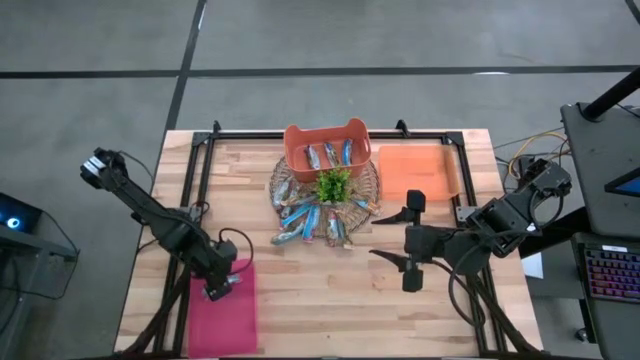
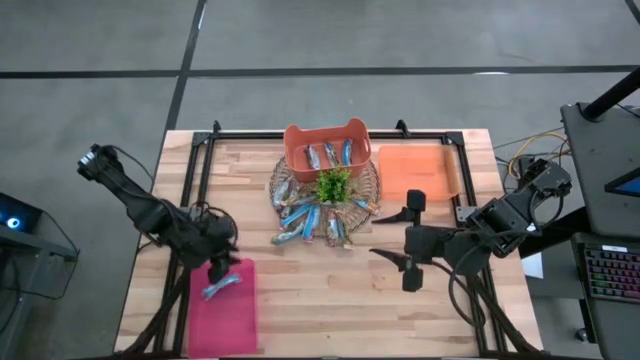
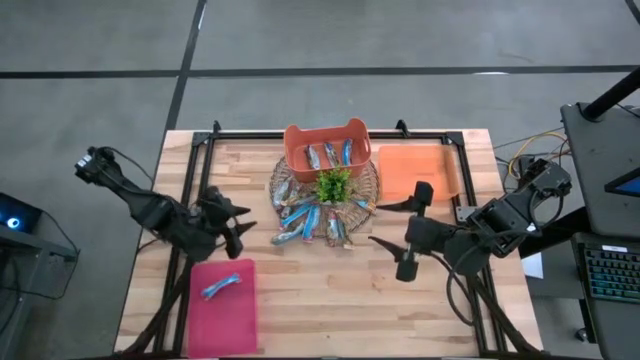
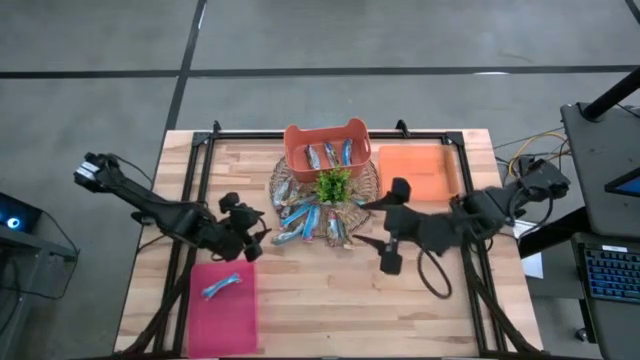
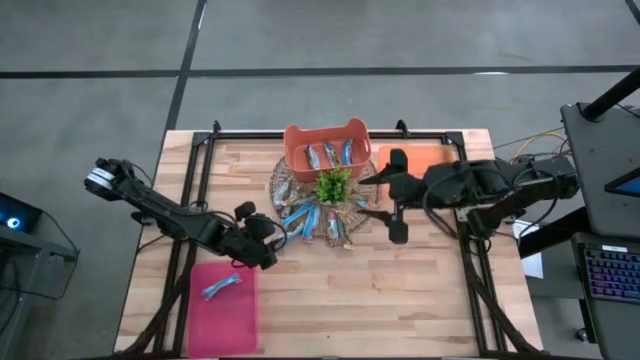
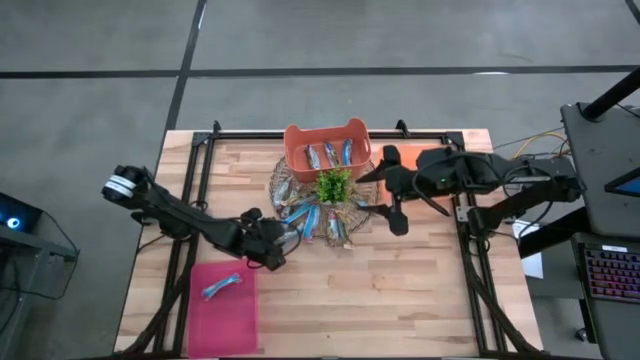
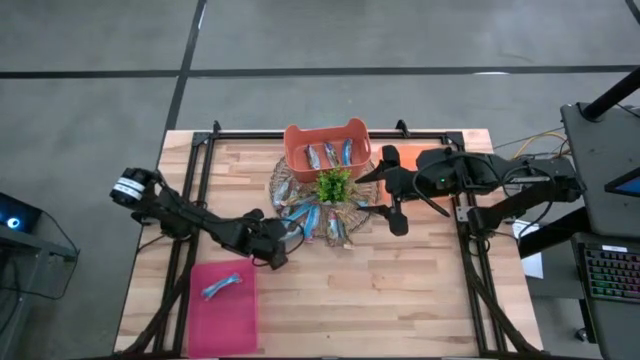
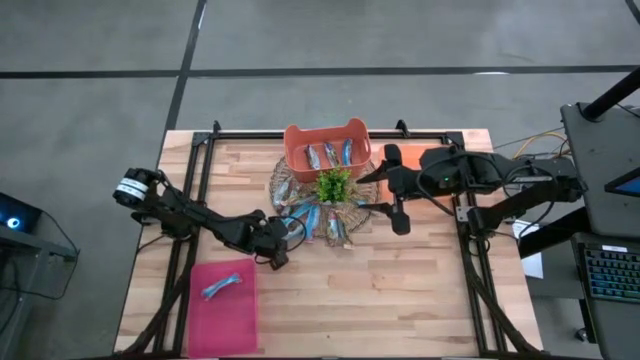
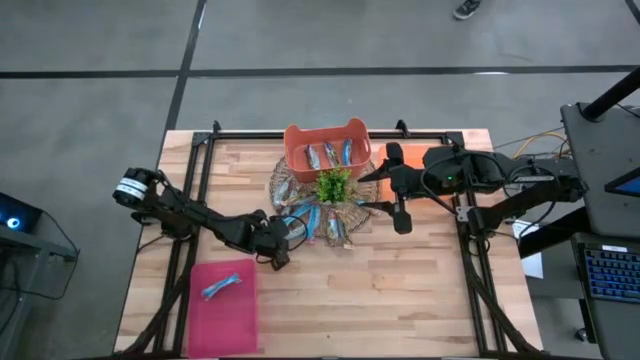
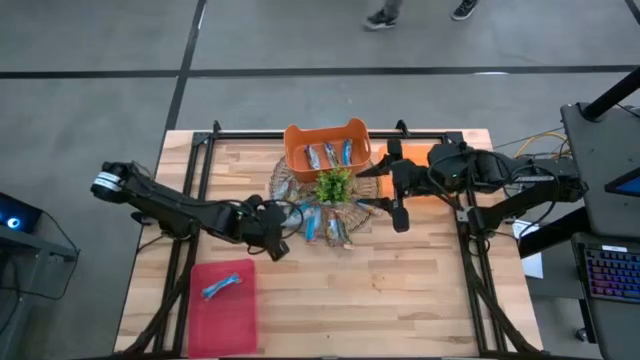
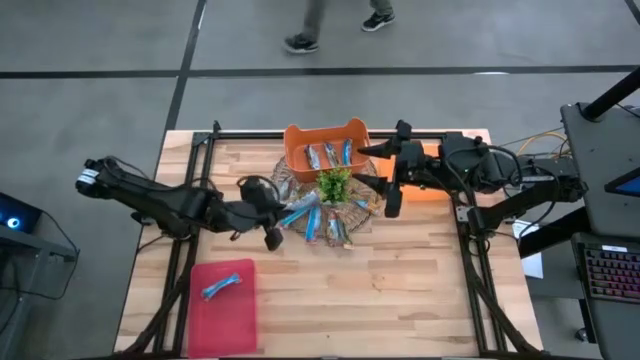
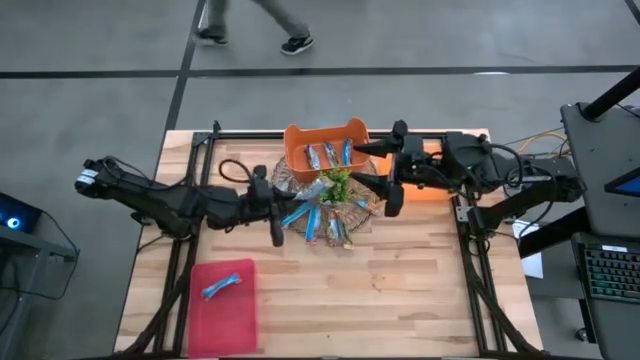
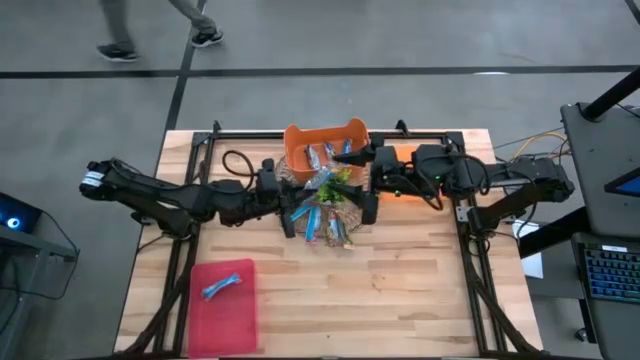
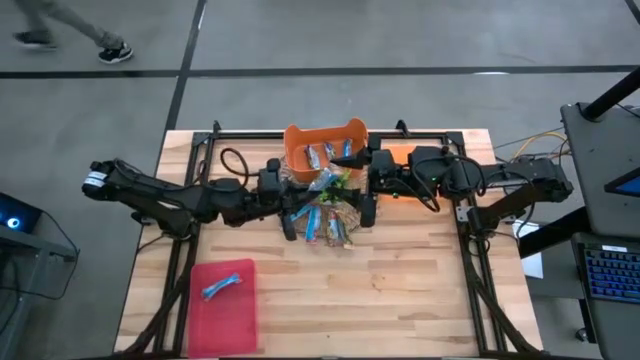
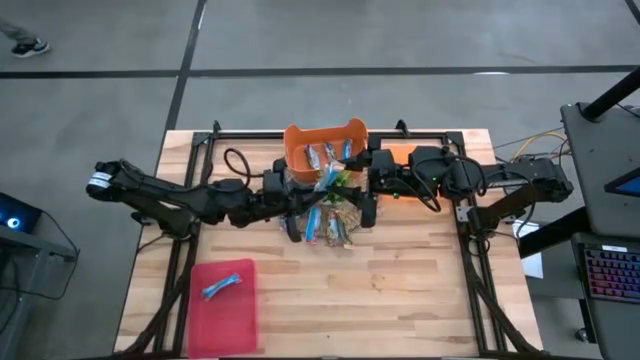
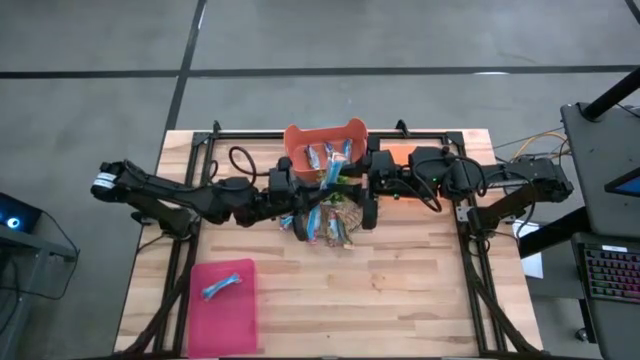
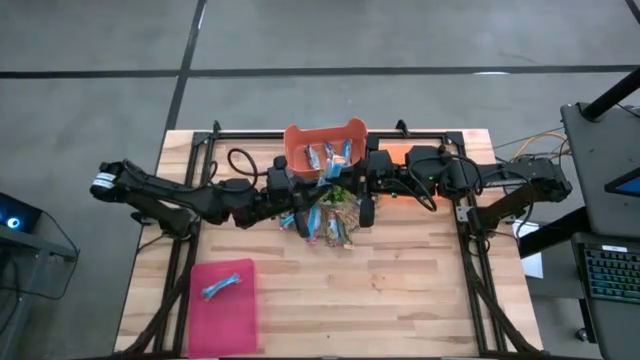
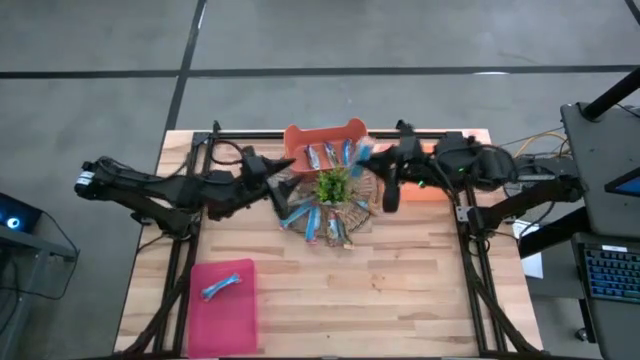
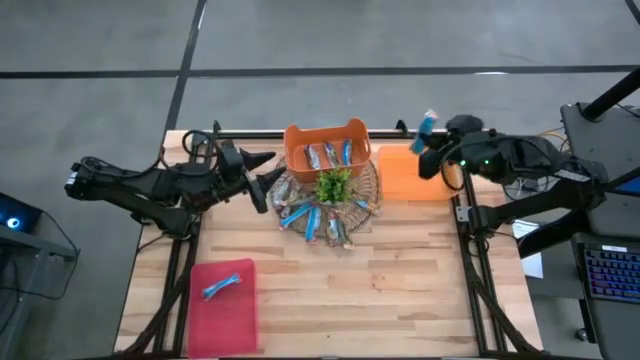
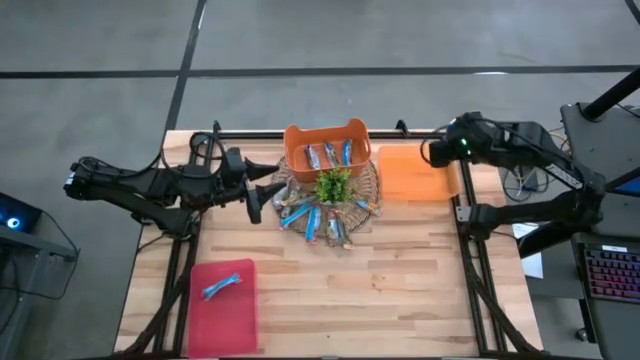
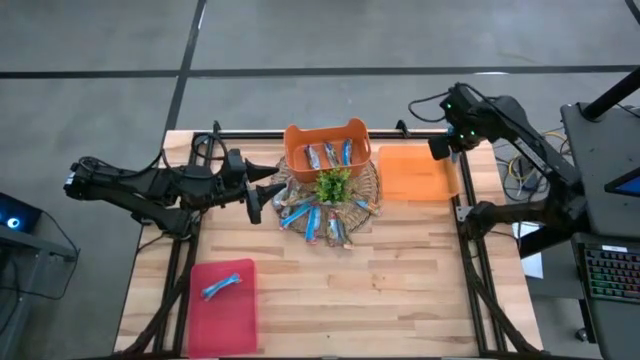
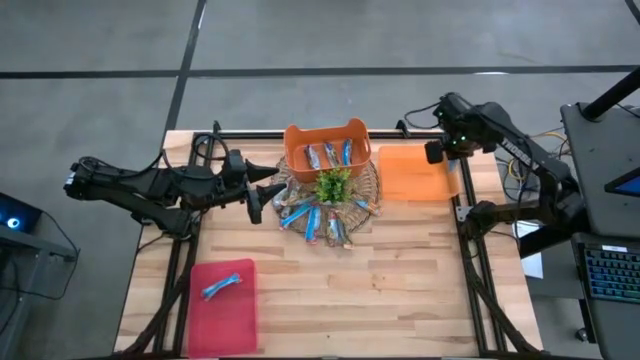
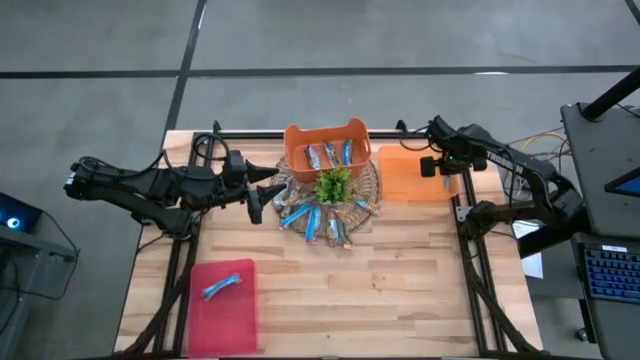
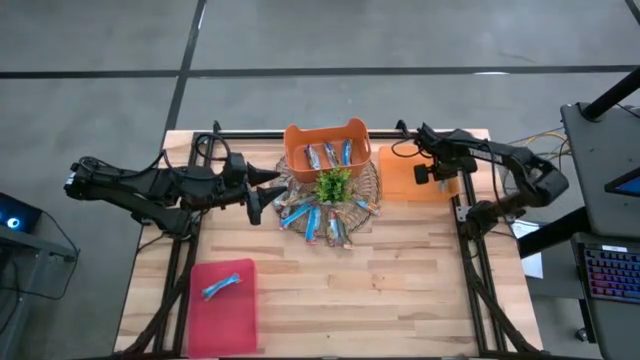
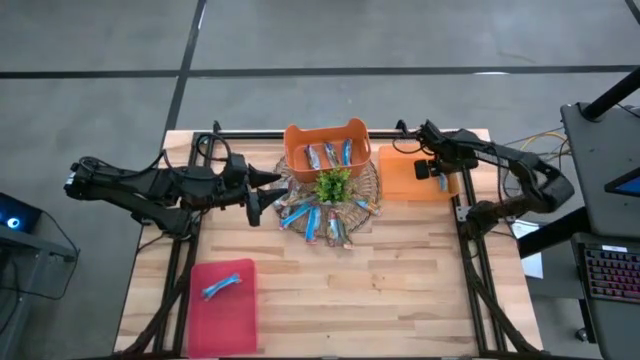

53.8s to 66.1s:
Task: Pick and place Granola Bars by type
Put the orange granola bar into the orange bin

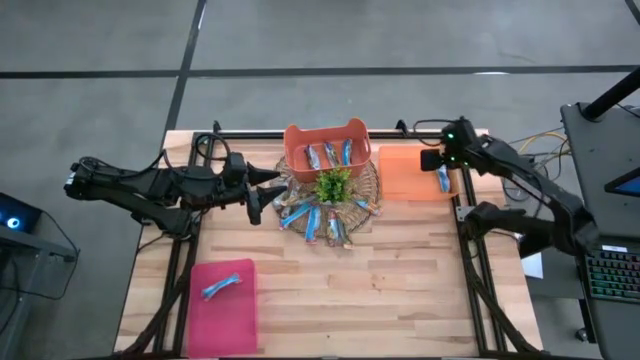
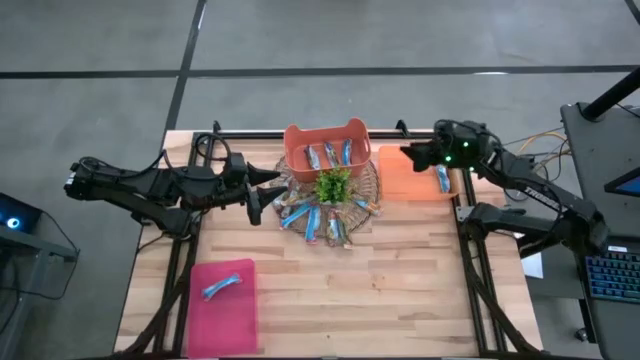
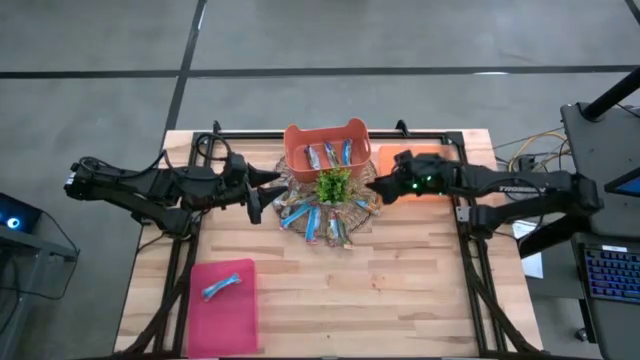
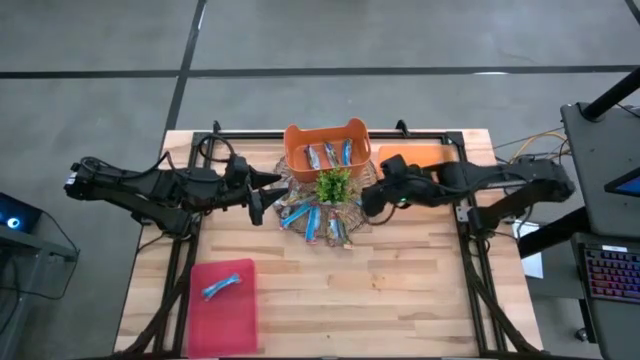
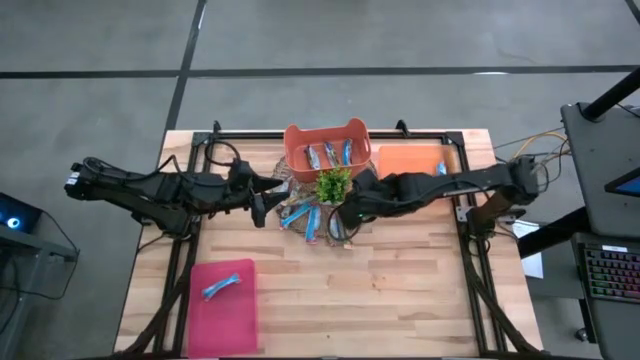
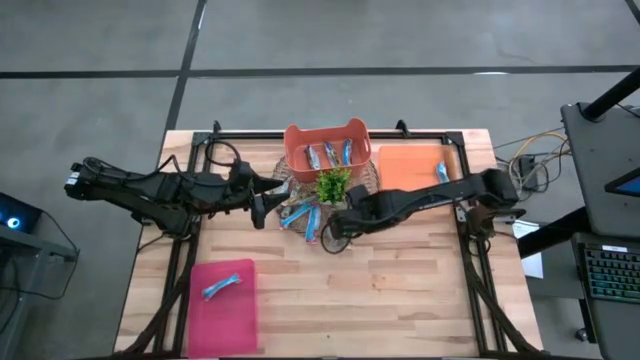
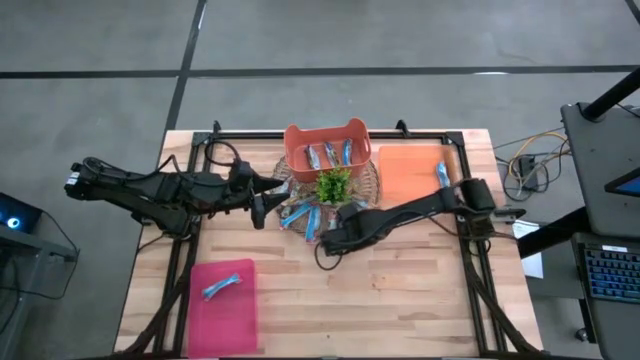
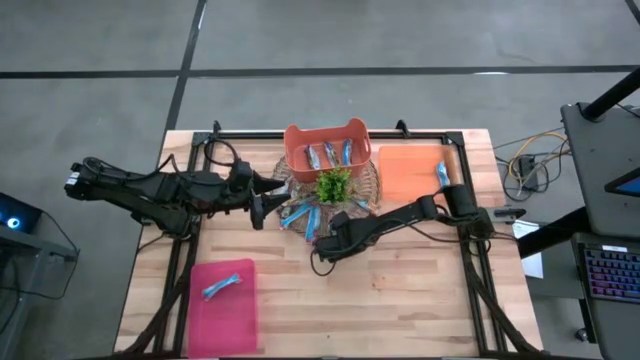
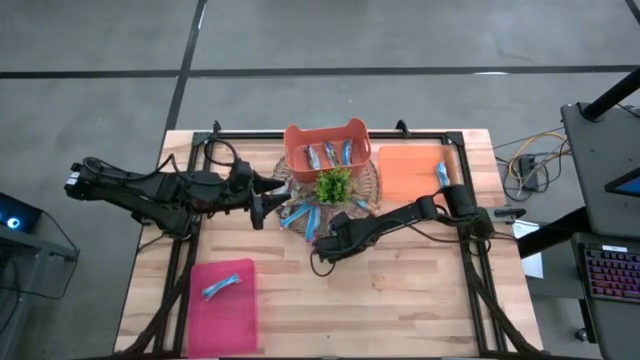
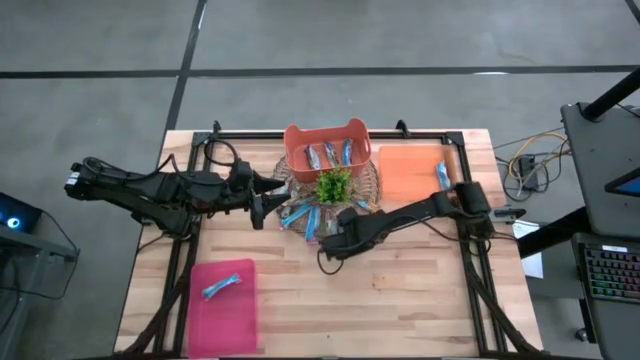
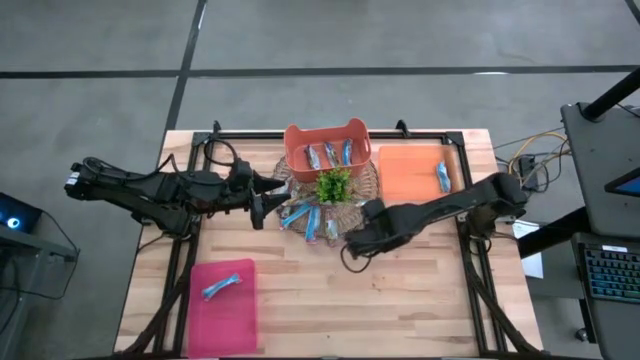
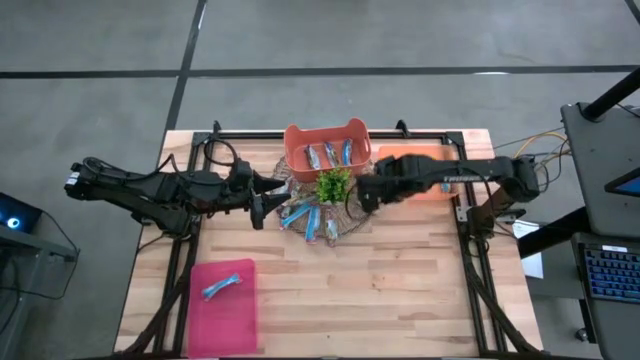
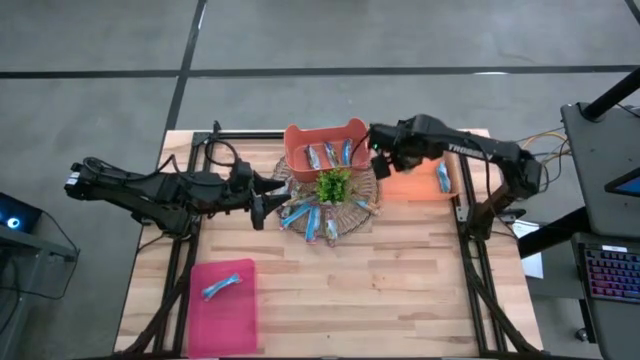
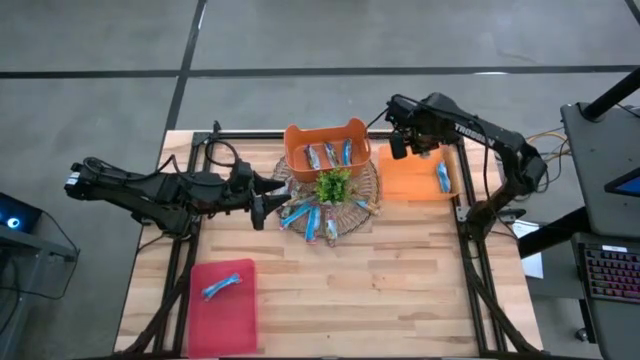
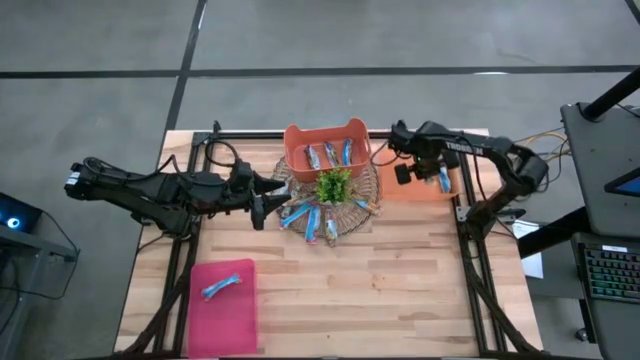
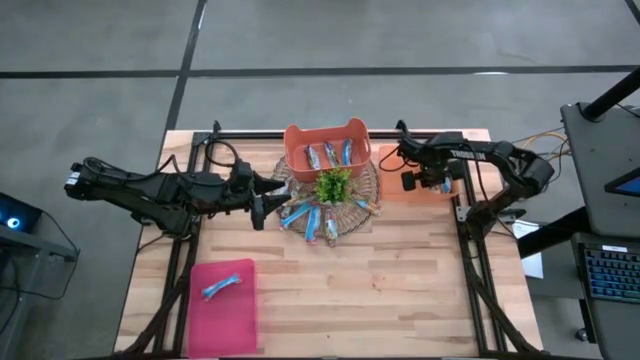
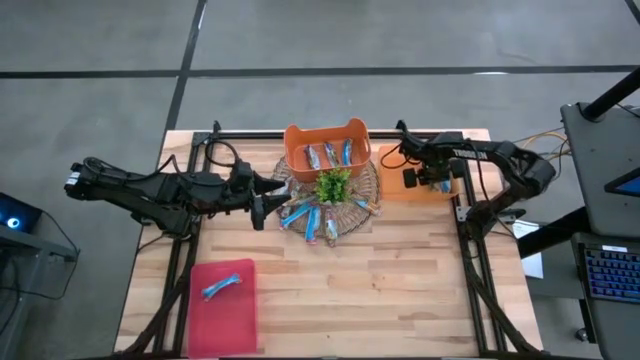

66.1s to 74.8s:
Put the orange granola bar into the orange bin

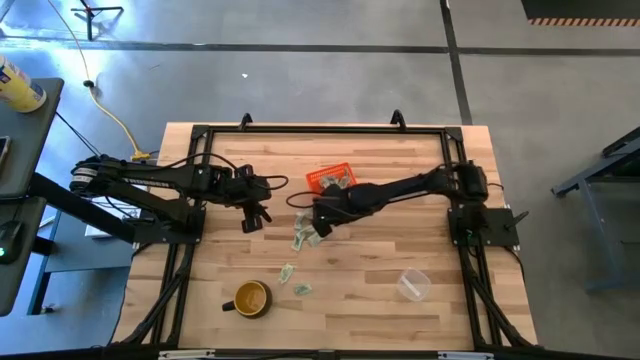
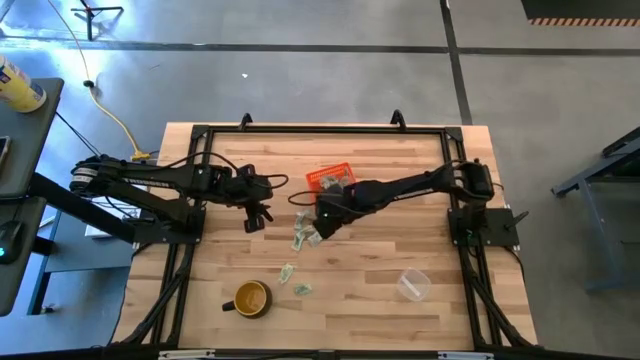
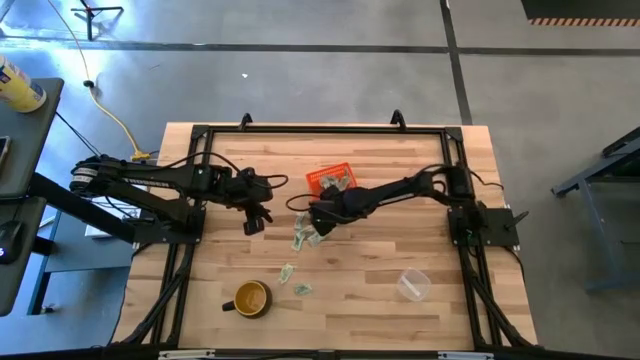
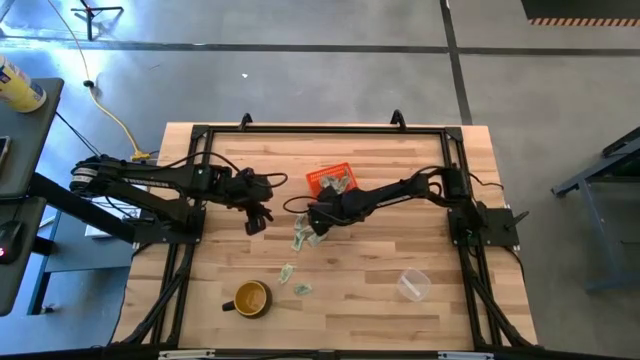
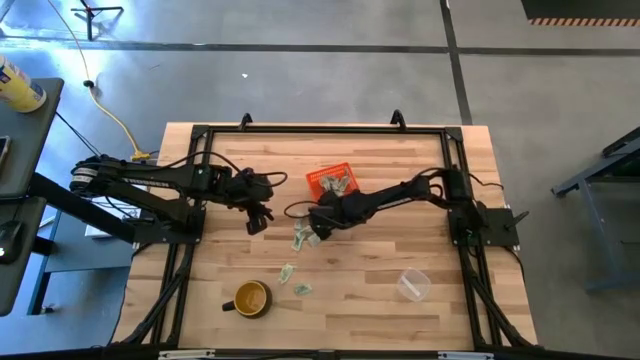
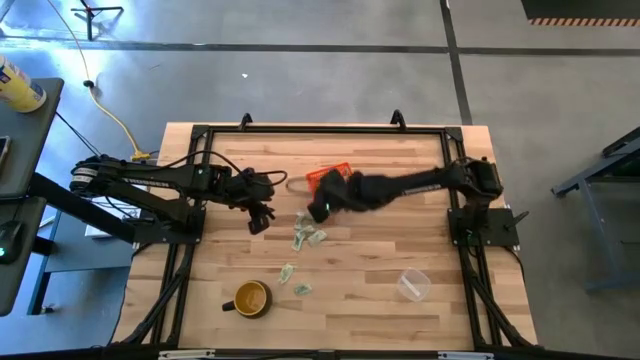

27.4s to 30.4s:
Task: Pick and place items into bin
Put the green stevia packet into the orange bin
